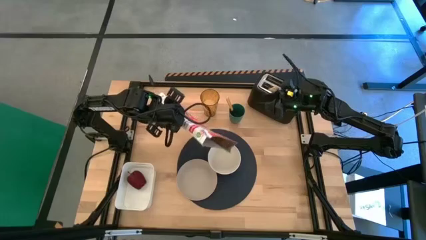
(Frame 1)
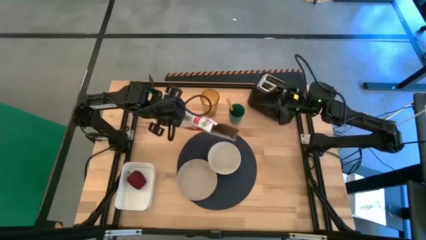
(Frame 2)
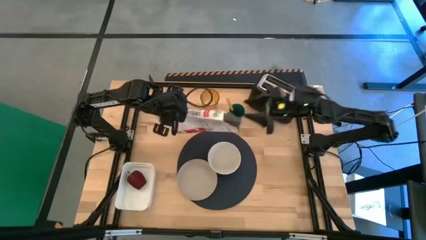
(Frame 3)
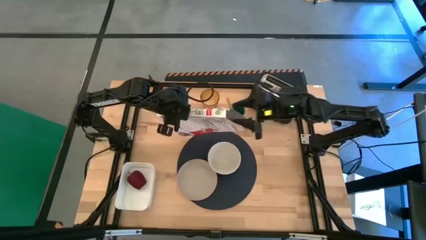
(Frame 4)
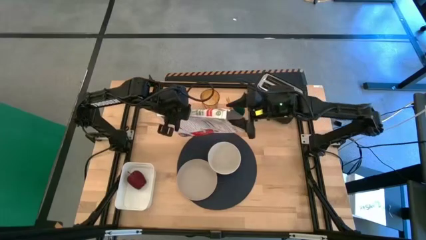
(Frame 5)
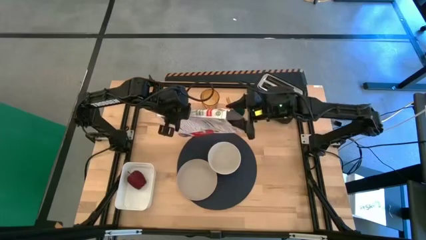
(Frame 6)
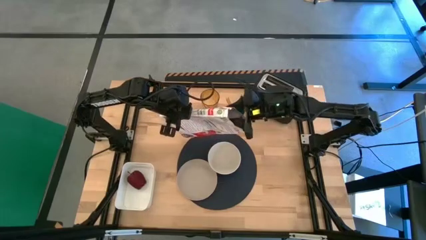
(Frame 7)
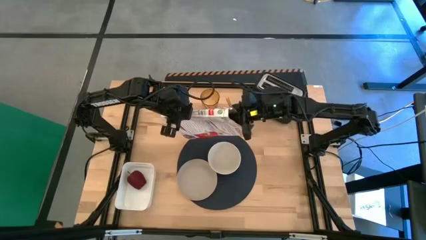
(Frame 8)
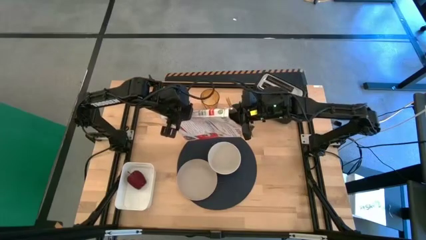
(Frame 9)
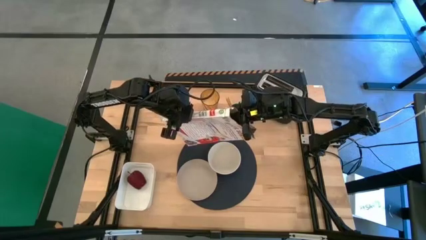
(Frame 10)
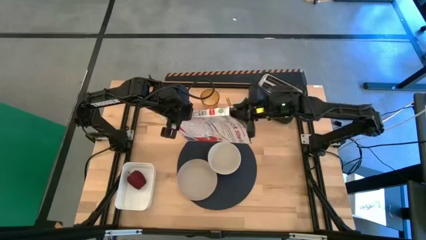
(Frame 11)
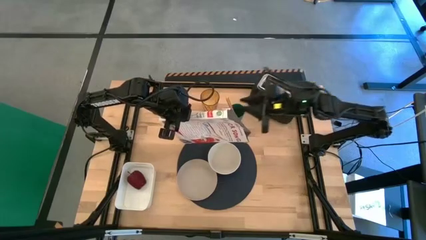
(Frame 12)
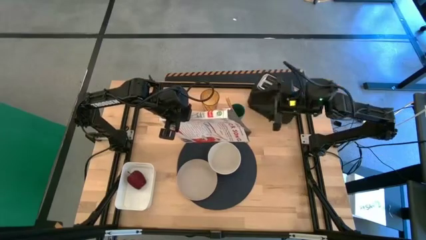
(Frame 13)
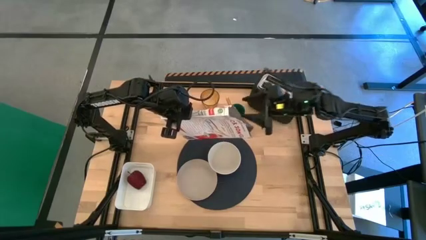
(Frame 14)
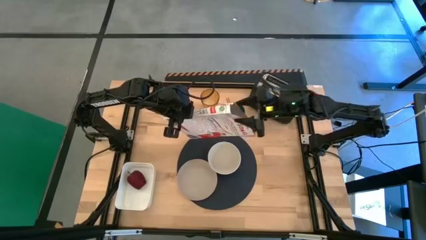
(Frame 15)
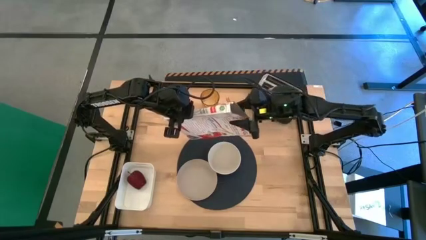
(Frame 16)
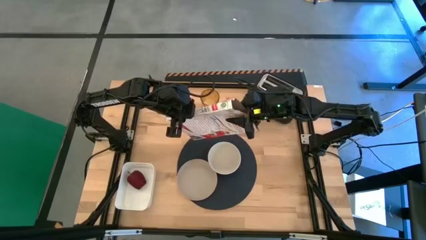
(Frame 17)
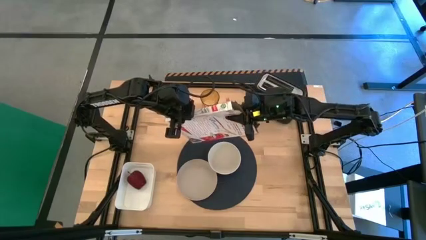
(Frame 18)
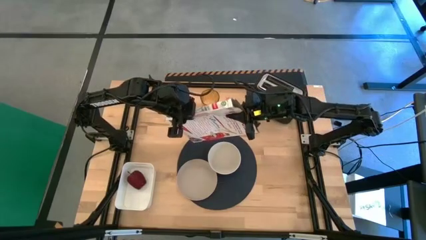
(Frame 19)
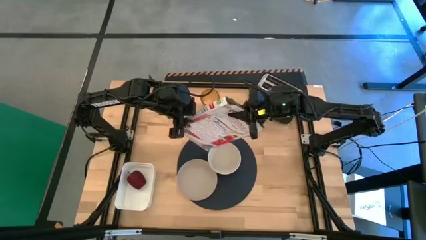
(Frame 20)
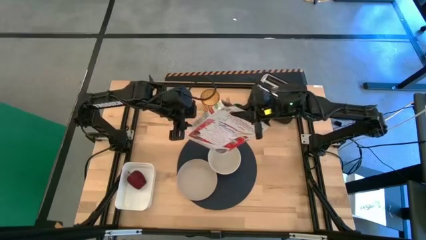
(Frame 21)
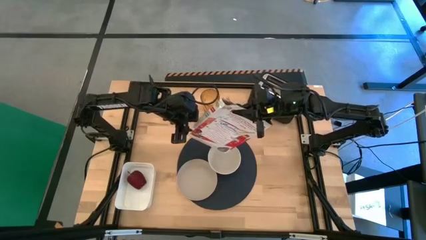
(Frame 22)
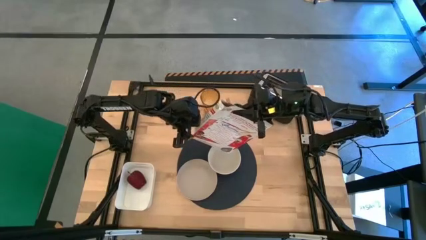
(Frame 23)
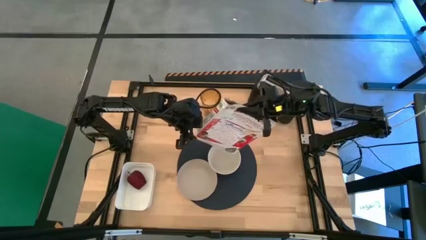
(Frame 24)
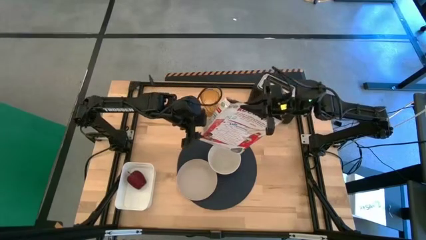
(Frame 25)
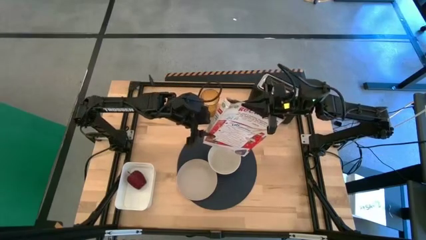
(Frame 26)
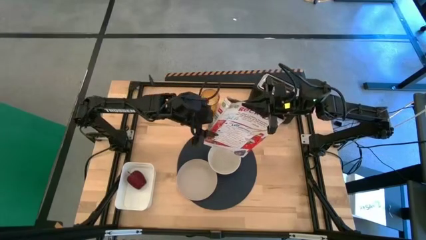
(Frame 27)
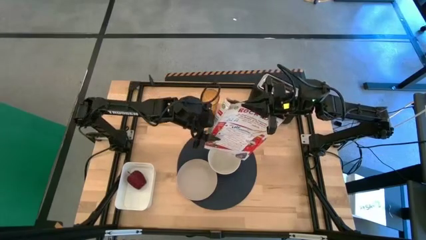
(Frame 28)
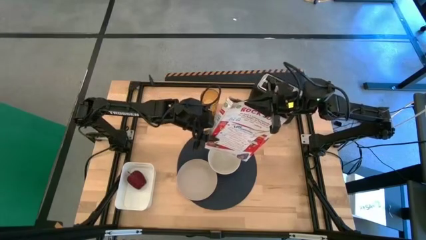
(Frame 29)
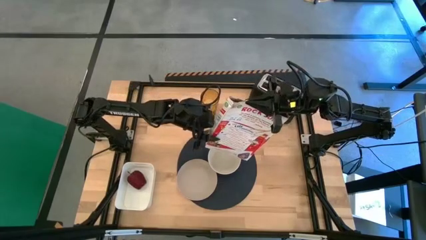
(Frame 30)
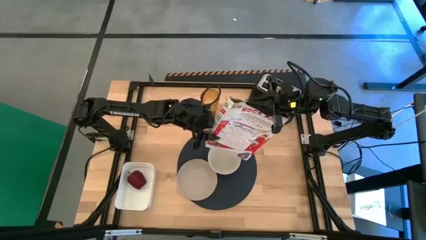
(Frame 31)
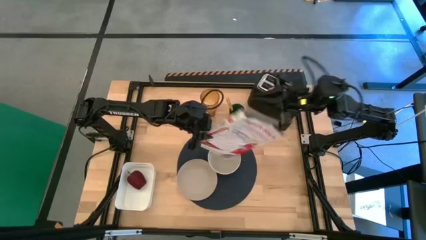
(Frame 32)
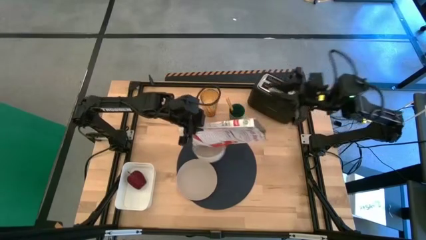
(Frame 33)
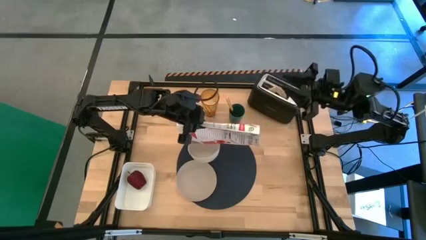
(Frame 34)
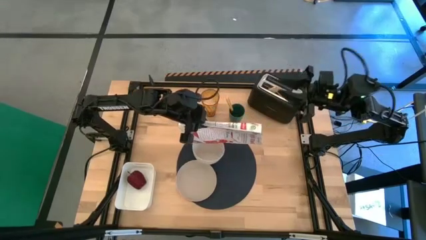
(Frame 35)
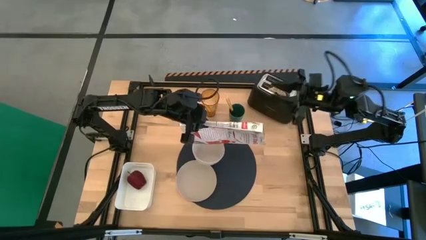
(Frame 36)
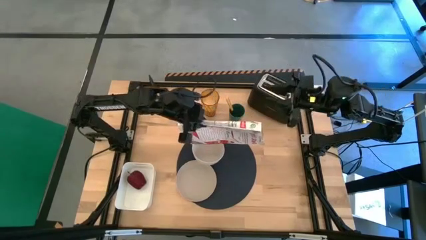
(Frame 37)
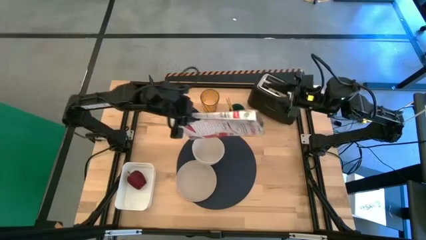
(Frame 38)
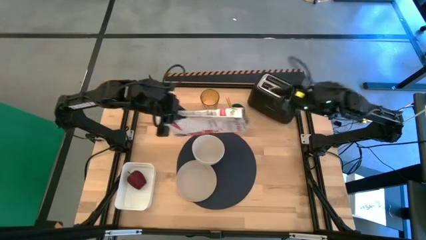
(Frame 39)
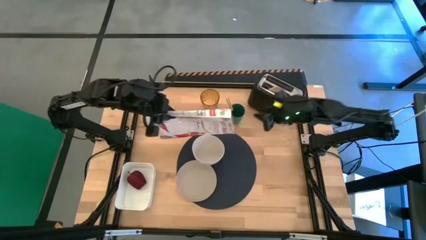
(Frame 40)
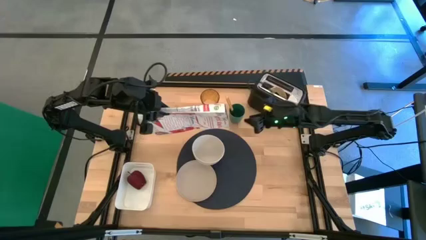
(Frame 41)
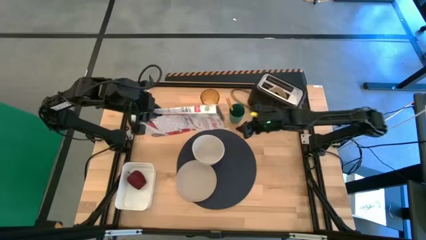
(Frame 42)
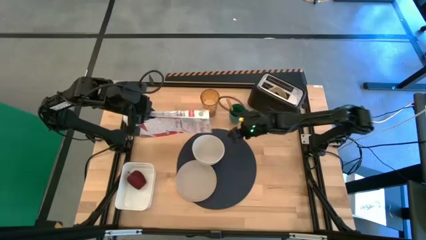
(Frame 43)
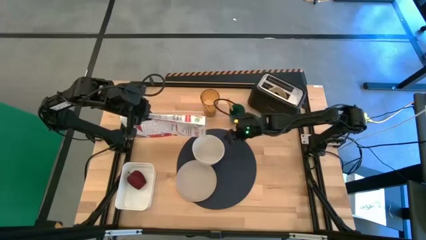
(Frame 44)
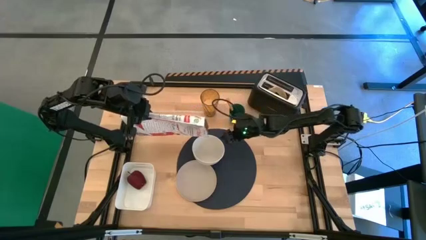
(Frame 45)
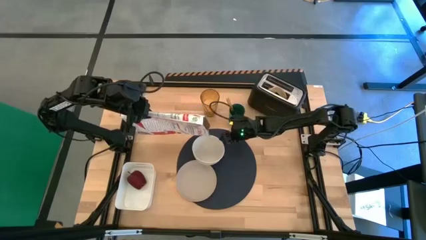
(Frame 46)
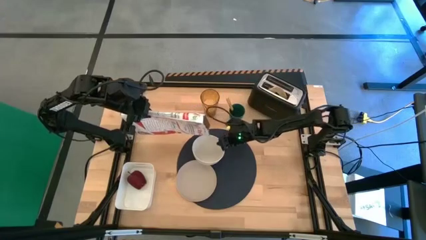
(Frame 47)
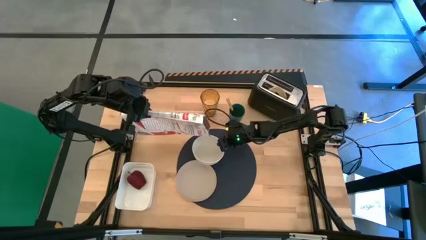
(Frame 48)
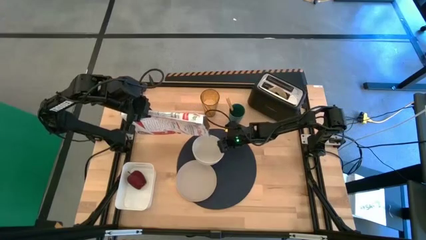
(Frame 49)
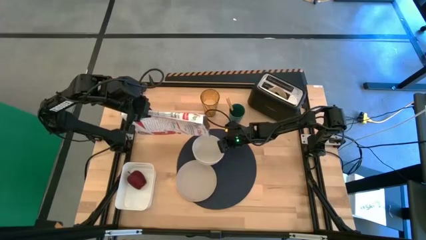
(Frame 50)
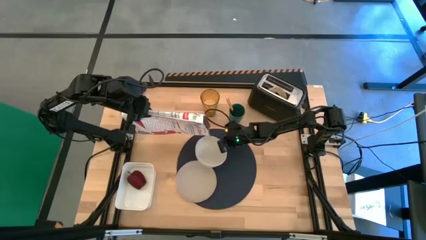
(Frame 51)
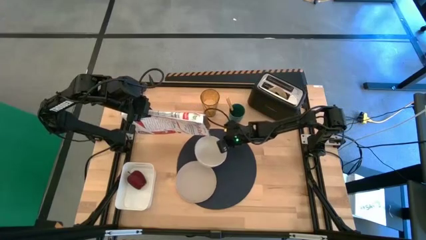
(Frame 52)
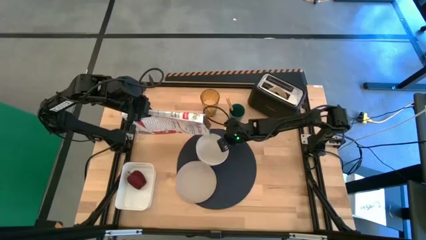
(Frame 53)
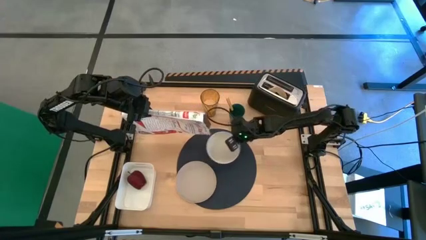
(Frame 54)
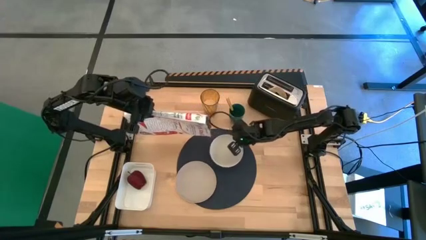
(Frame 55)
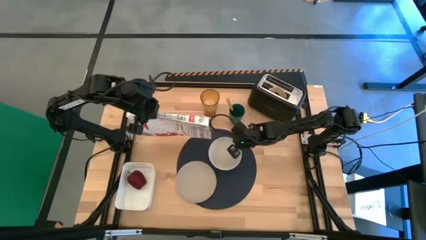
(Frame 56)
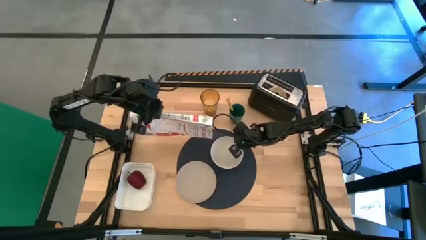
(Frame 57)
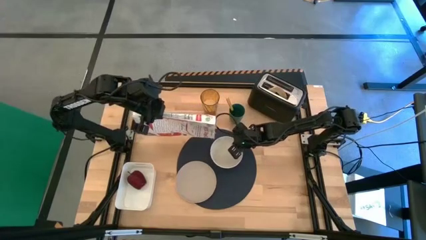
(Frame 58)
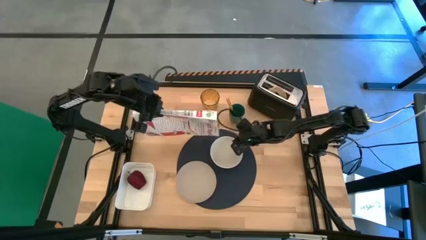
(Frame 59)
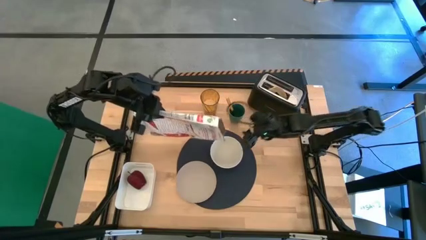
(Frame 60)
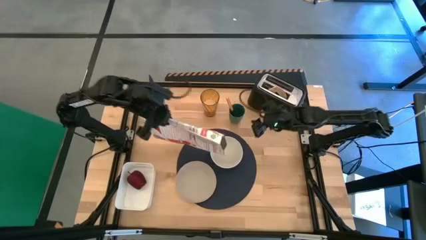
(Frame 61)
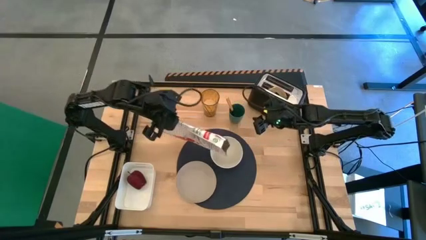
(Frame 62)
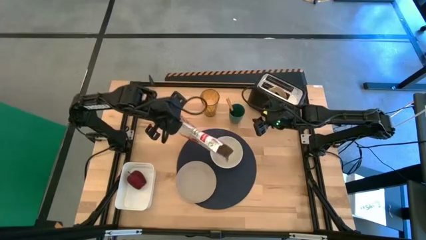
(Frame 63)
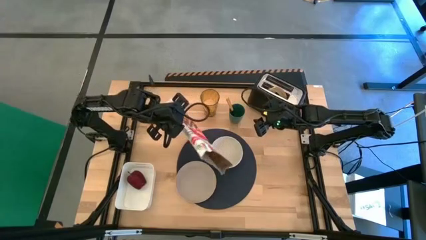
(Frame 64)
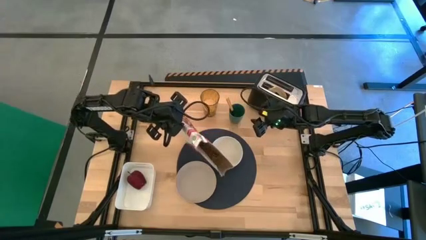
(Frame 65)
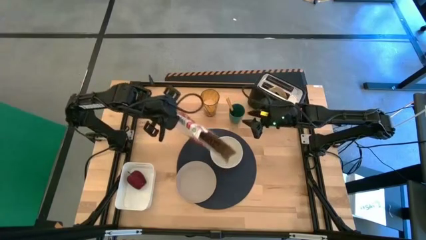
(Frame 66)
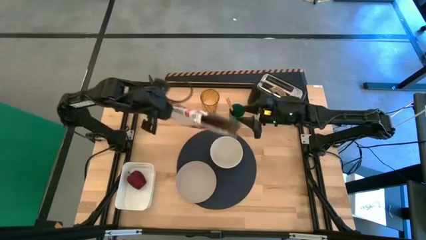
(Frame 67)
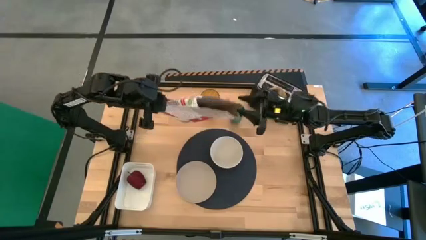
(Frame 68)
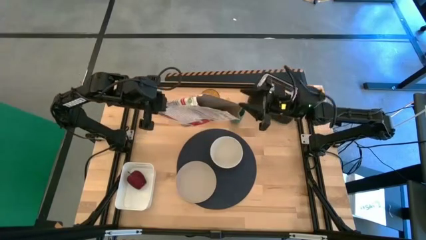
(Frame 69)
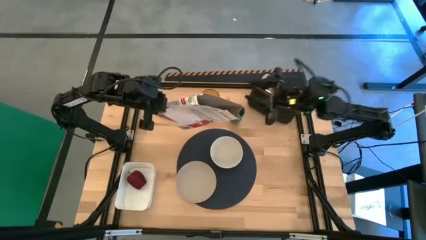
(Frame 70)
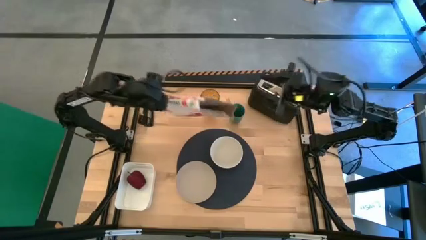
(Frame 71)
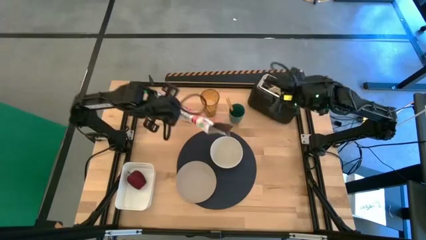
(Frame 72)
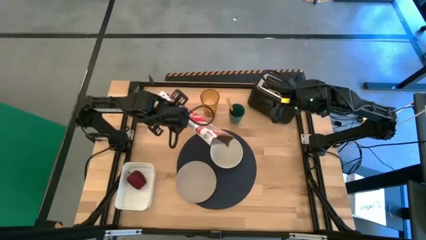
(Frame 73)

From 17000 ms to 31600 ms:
Task: Arrange a breakfast setting
Pour the cereal from the cereal box into the white bowl
